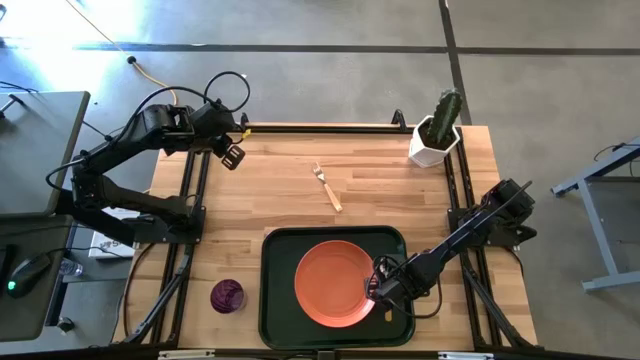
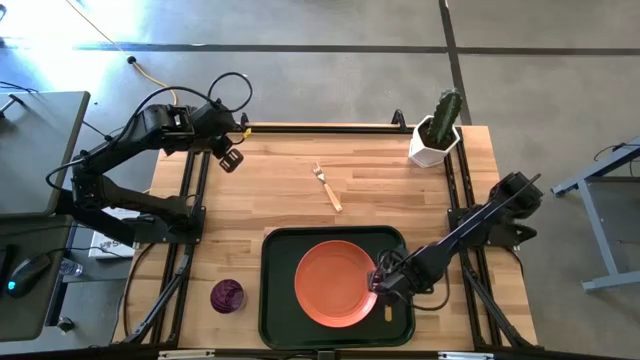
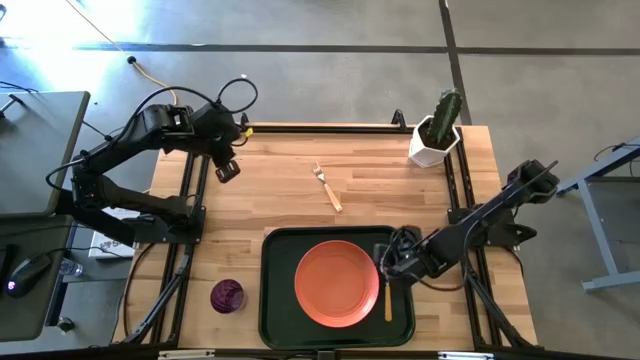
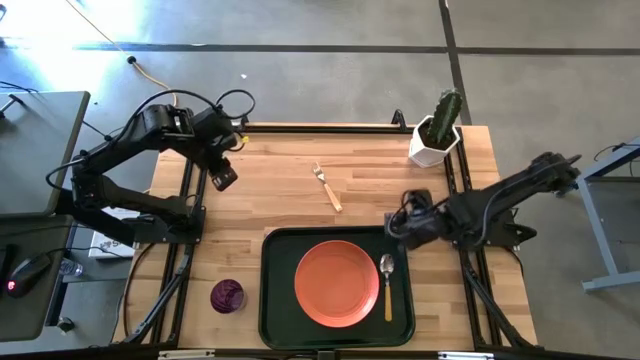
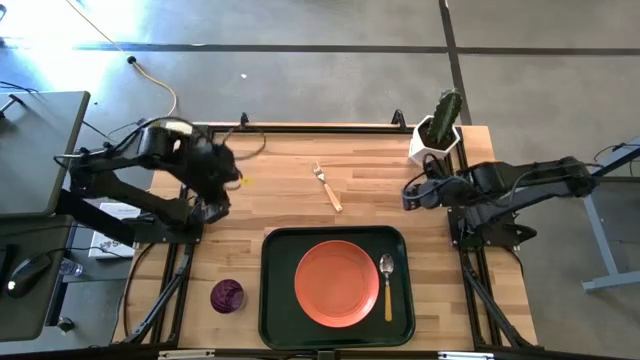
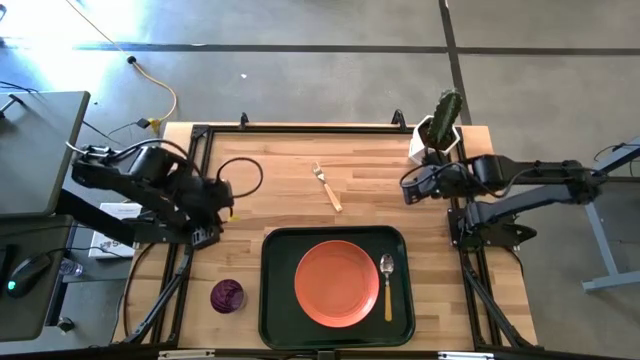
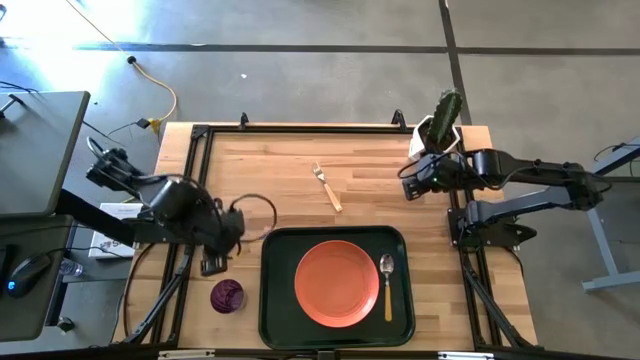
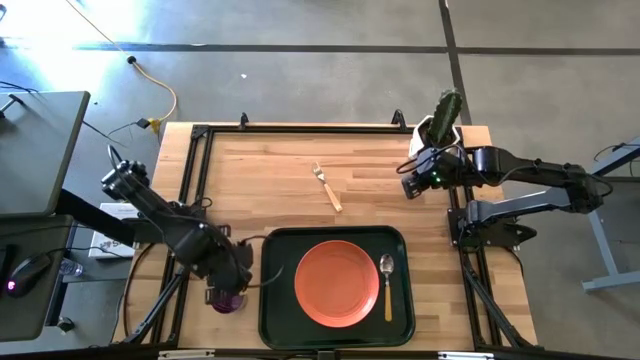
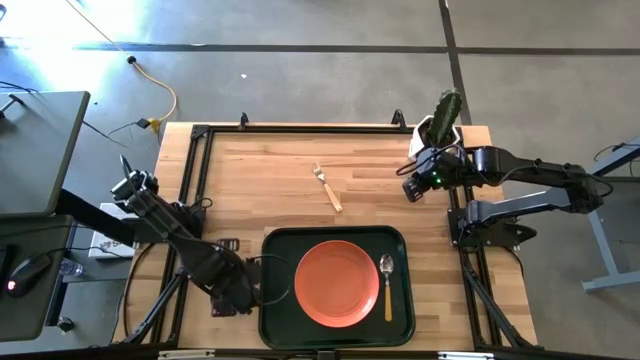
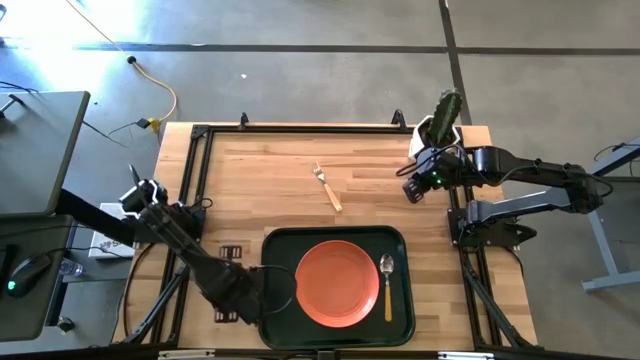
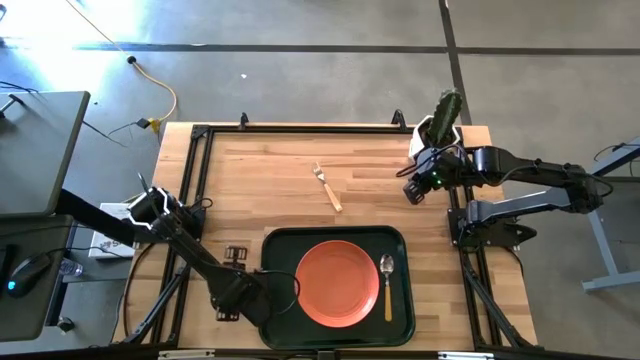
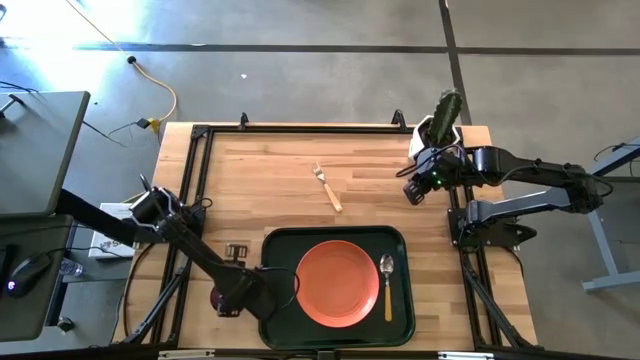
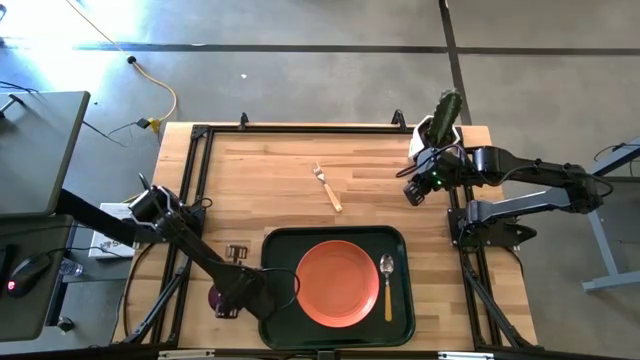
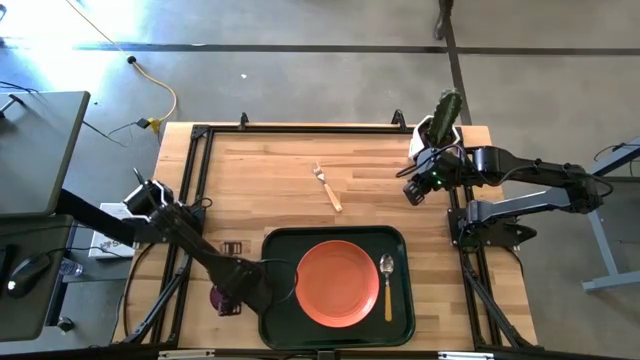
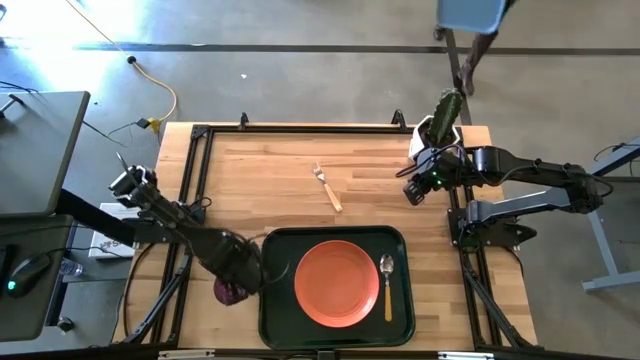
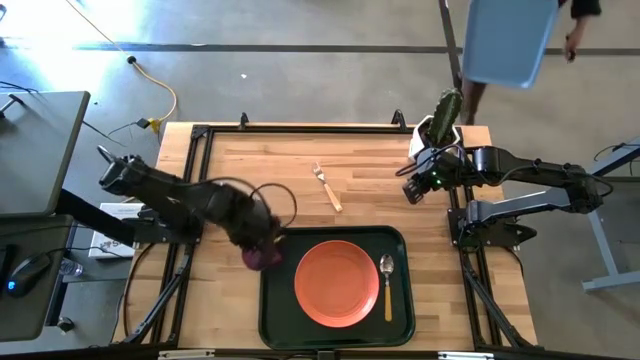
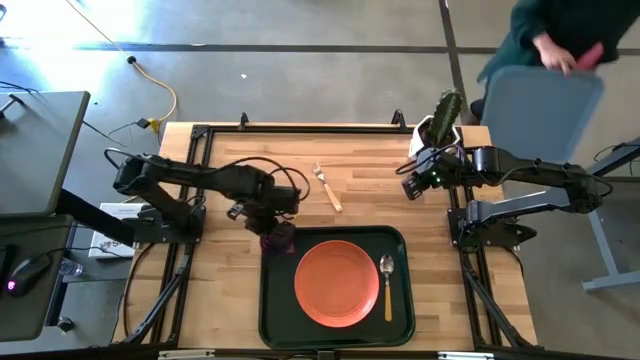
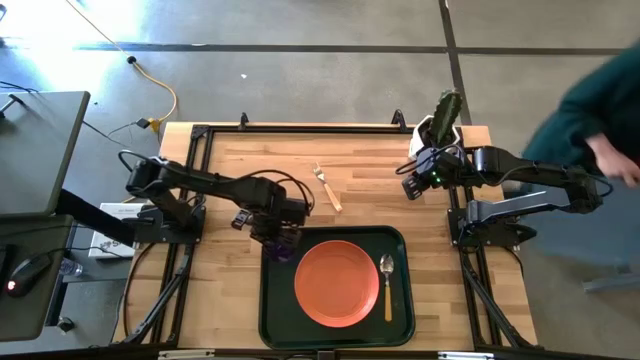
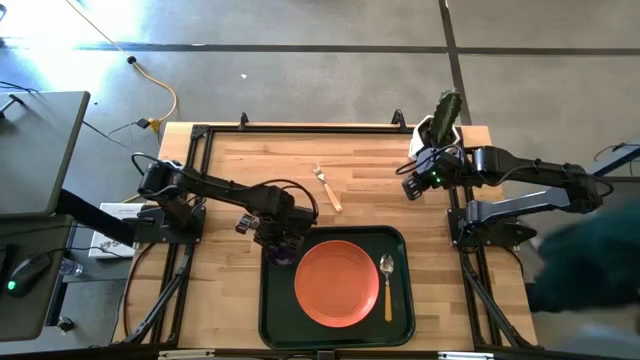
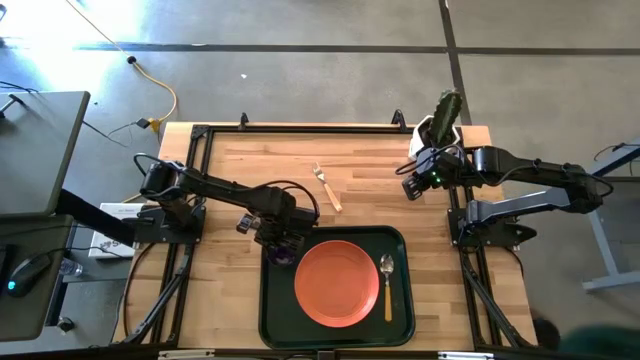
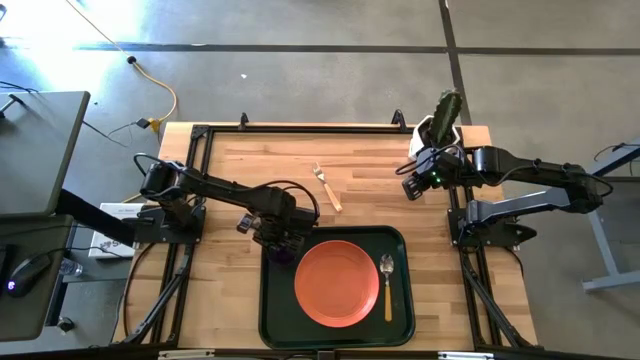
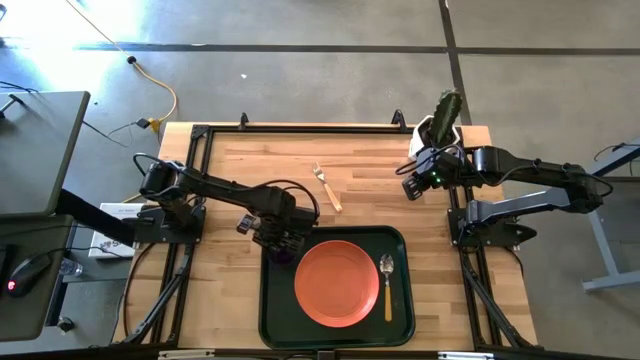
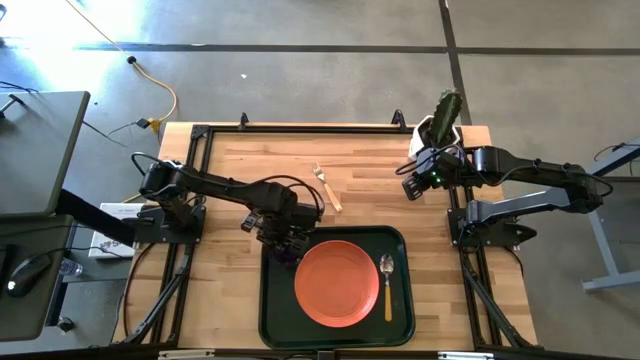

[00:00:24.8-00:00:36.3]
Task: Pick and place plate/cup/fork/spoon on tray
Put the violet cup on the black tray to the top left of the orange plate

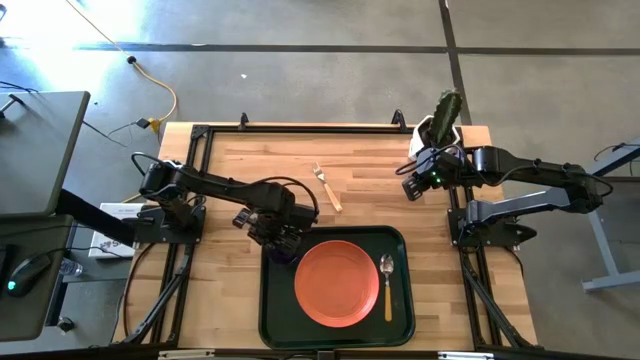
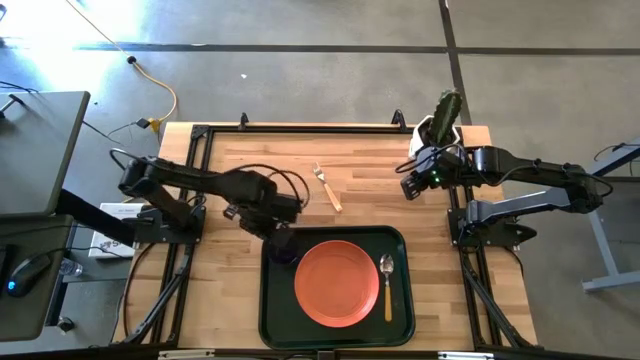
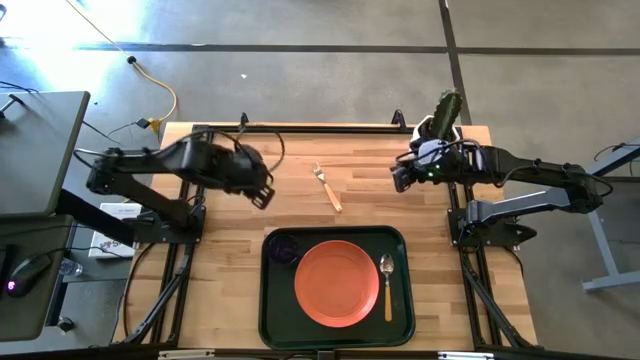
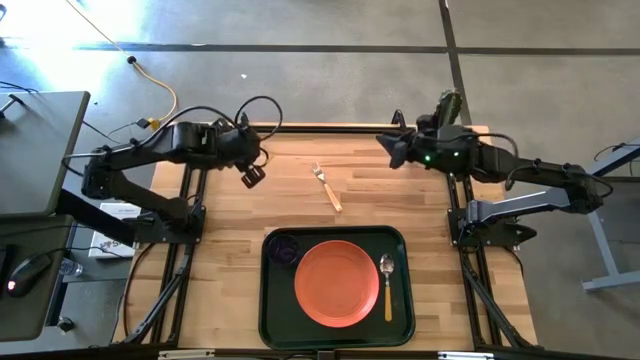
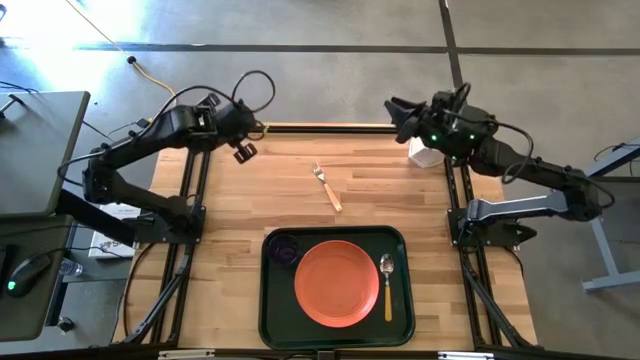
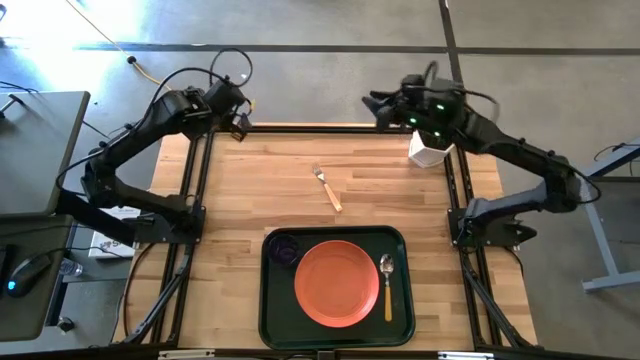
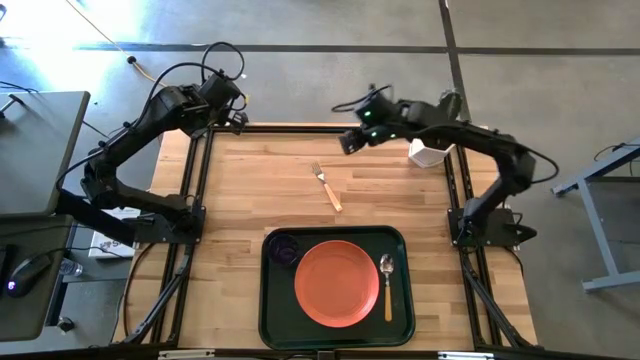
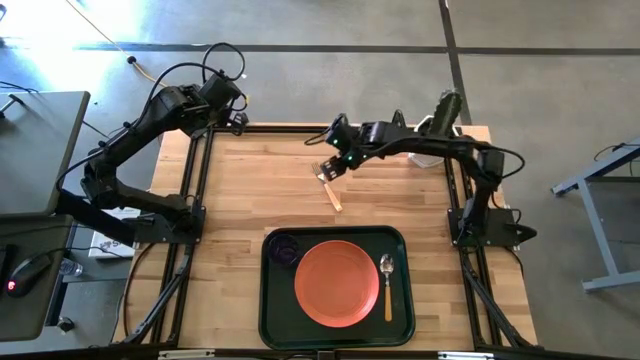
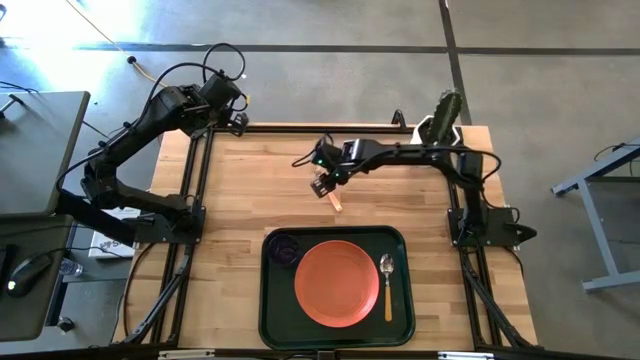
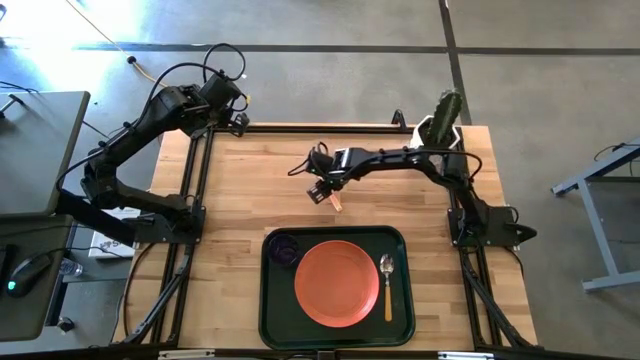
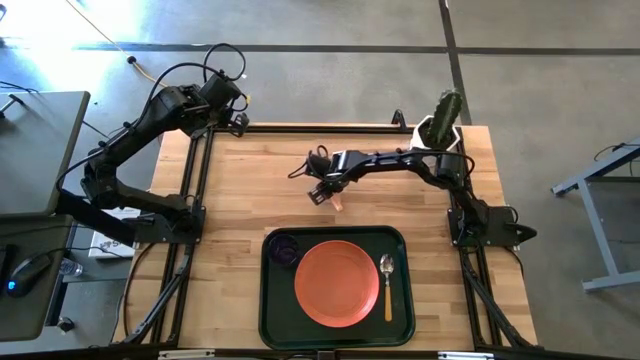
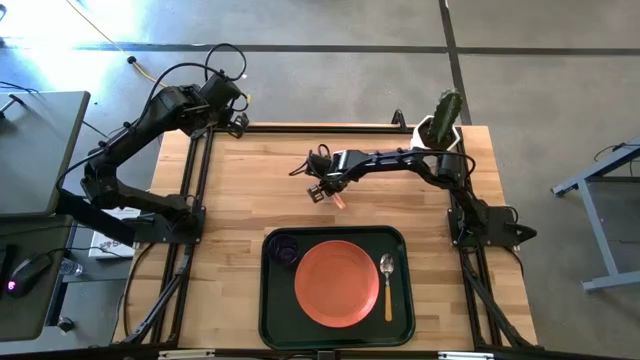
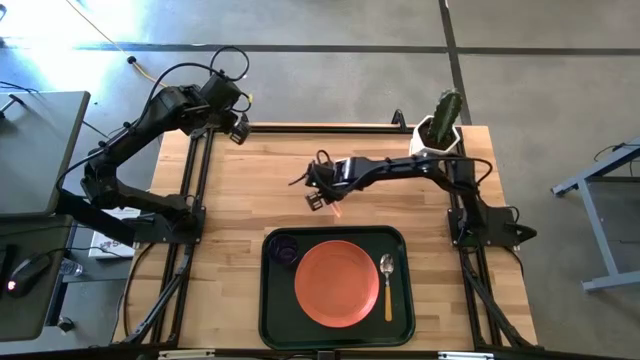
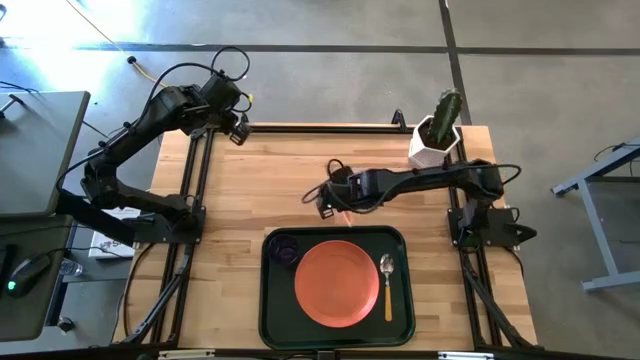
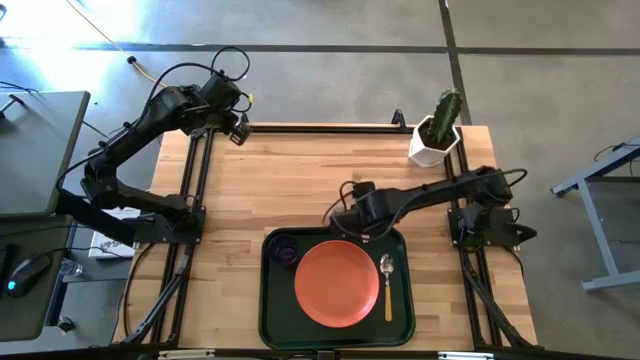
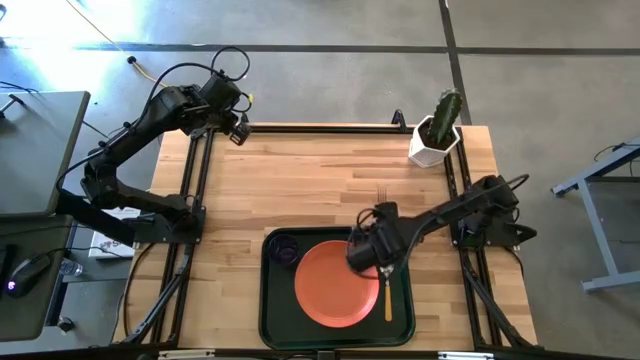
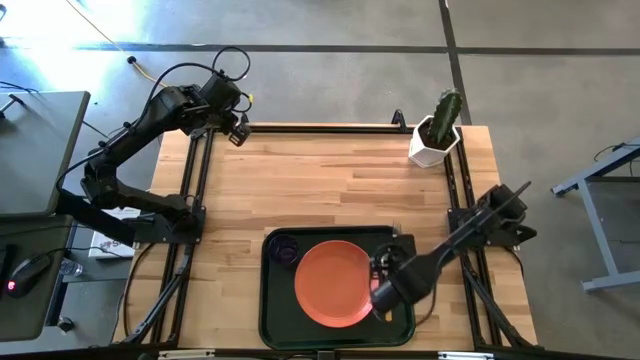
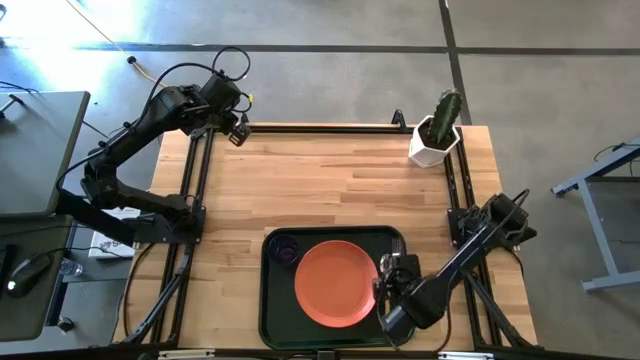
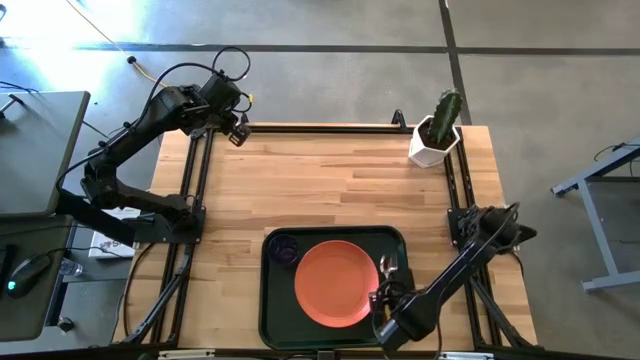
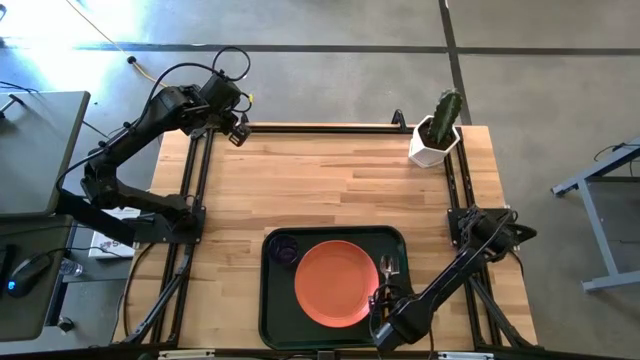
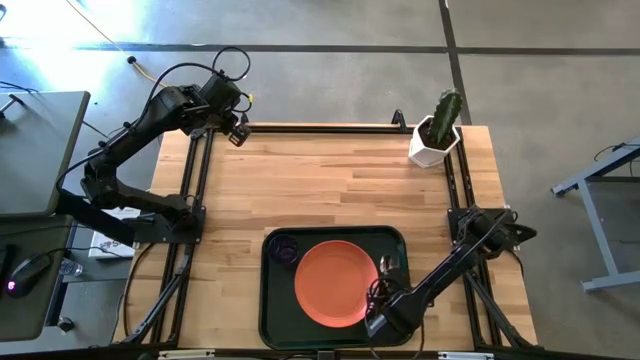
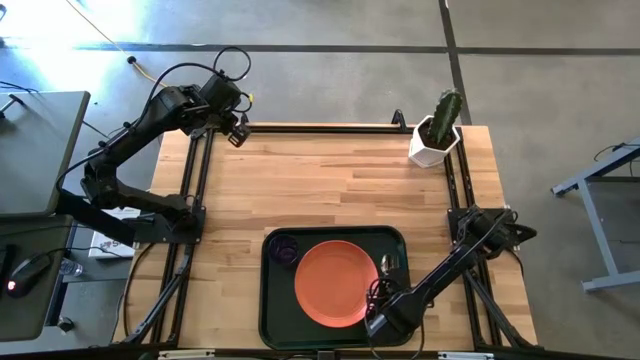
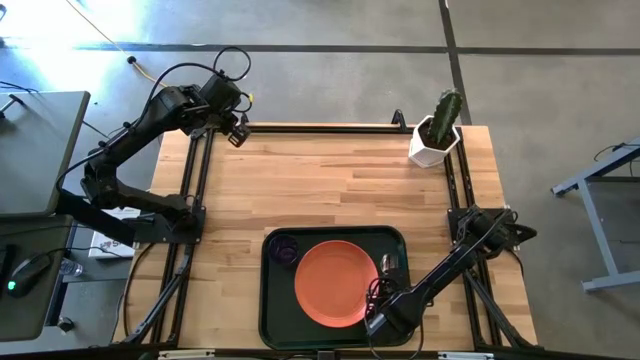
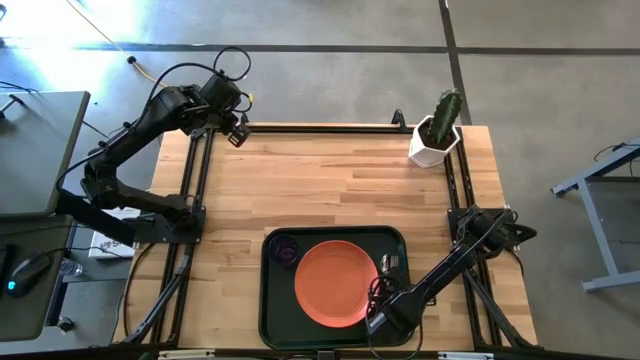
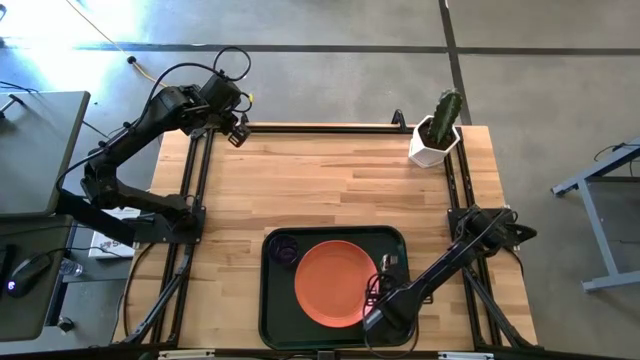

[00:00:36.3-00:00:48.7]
Put the orange fork on the black tray to the right of the yellow spoon
